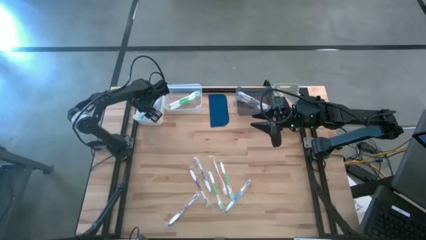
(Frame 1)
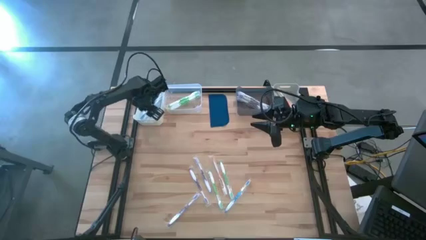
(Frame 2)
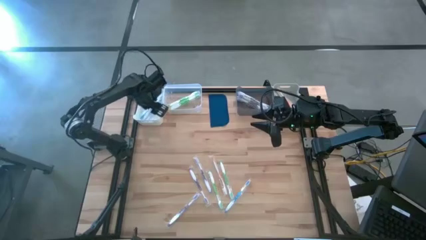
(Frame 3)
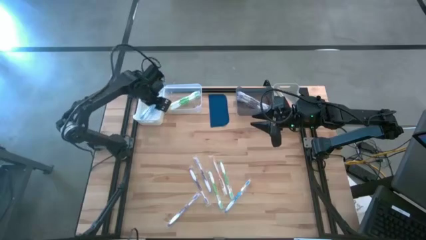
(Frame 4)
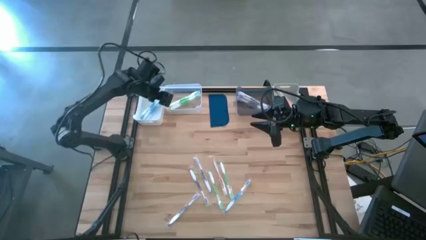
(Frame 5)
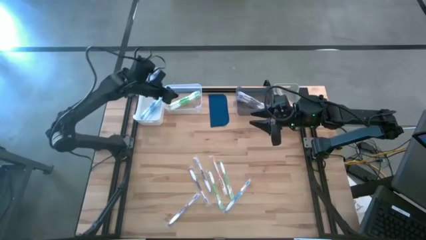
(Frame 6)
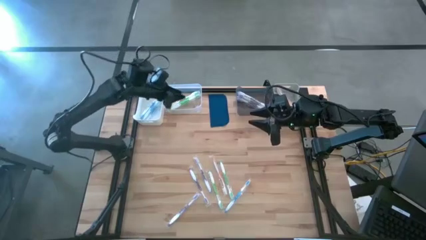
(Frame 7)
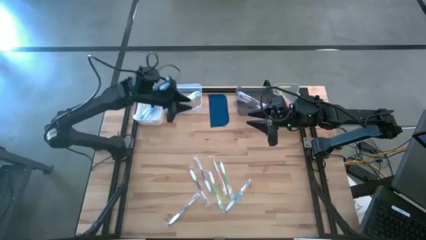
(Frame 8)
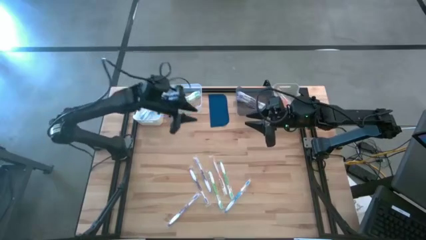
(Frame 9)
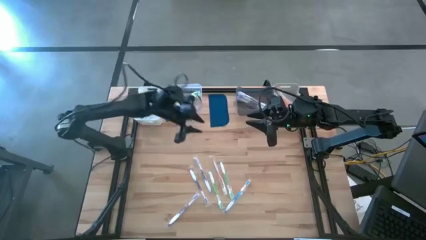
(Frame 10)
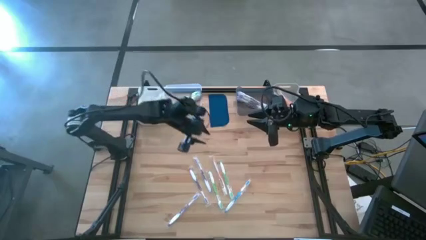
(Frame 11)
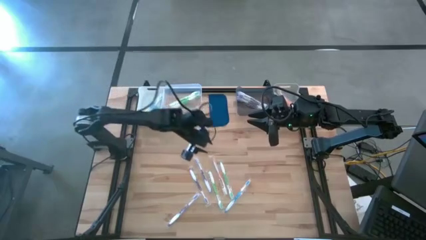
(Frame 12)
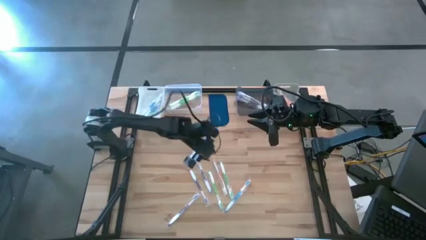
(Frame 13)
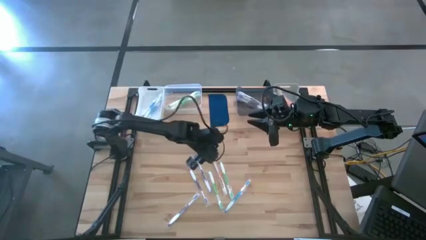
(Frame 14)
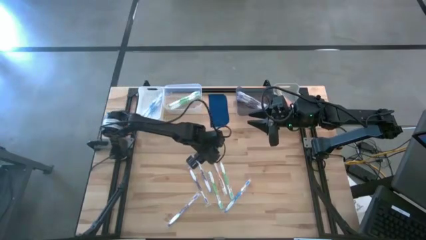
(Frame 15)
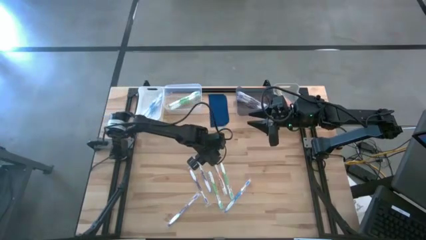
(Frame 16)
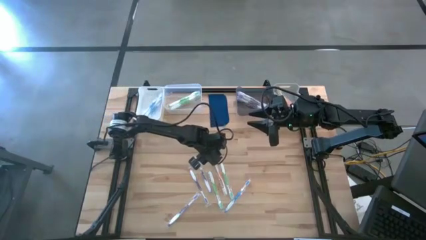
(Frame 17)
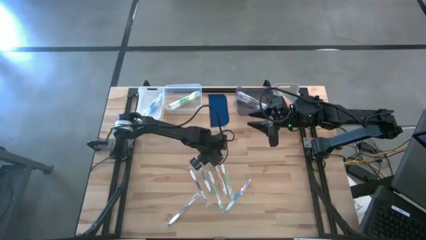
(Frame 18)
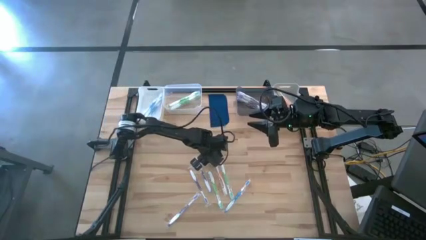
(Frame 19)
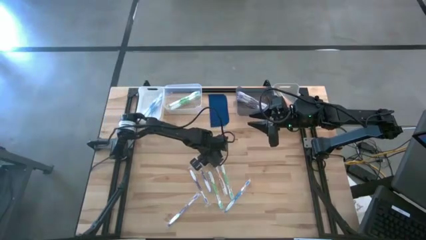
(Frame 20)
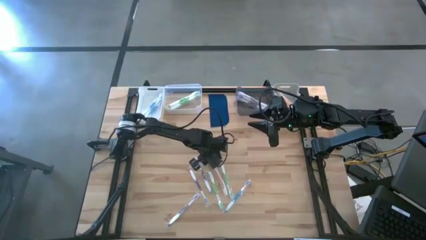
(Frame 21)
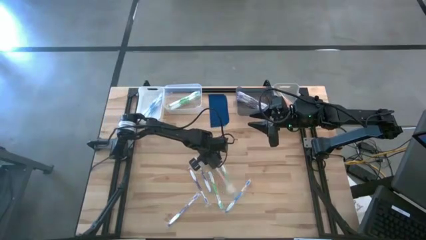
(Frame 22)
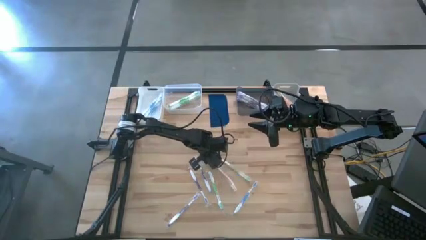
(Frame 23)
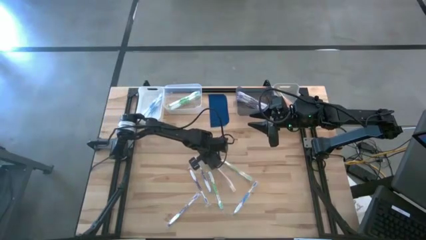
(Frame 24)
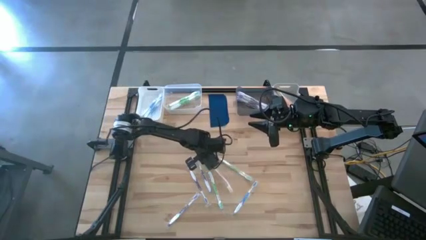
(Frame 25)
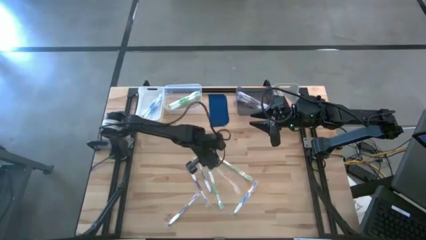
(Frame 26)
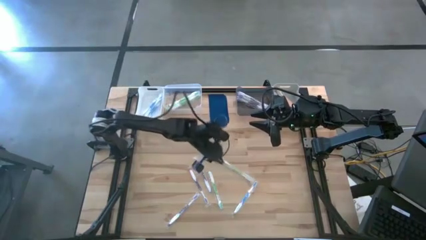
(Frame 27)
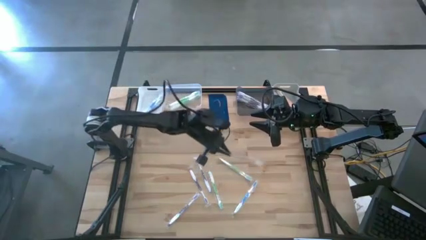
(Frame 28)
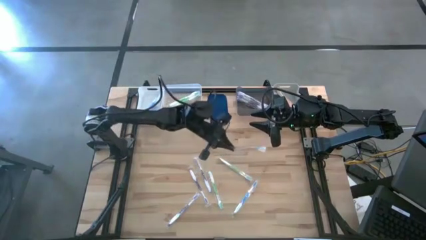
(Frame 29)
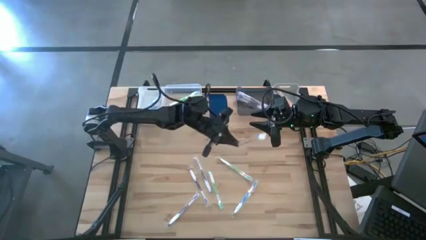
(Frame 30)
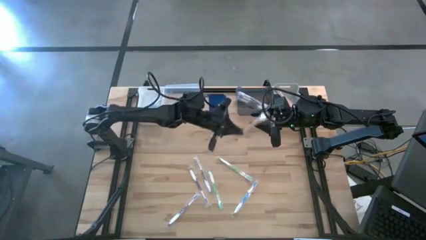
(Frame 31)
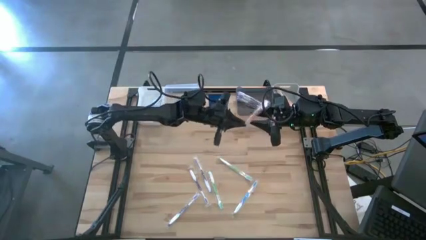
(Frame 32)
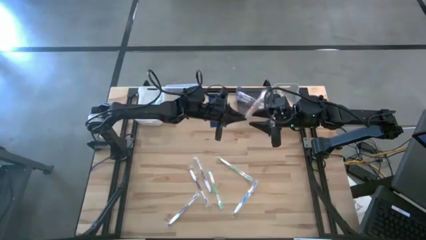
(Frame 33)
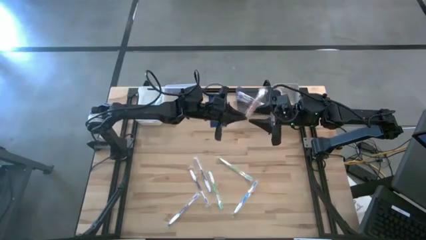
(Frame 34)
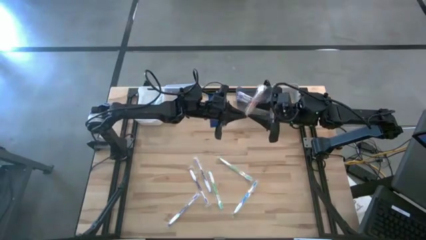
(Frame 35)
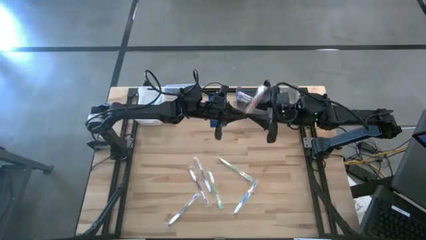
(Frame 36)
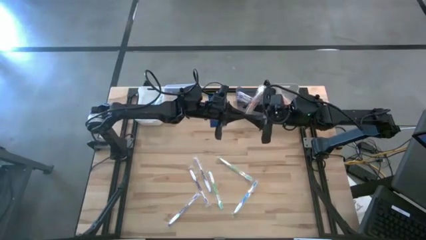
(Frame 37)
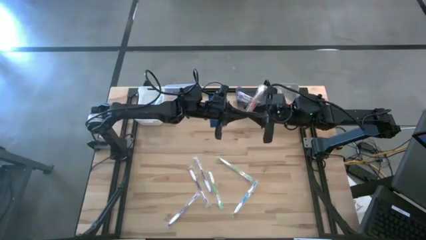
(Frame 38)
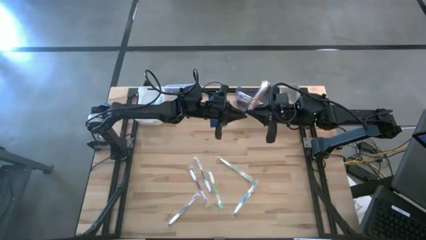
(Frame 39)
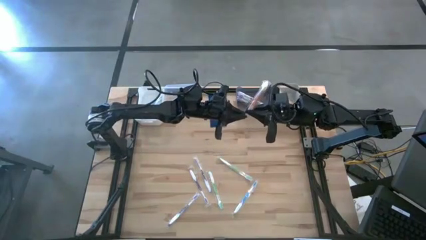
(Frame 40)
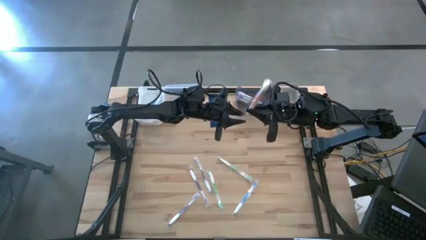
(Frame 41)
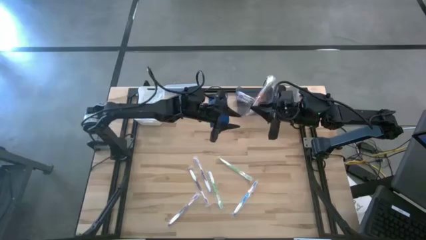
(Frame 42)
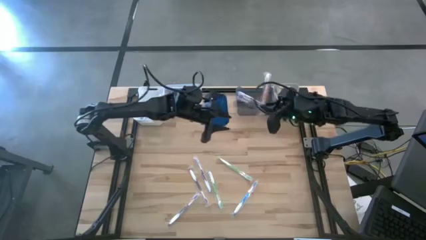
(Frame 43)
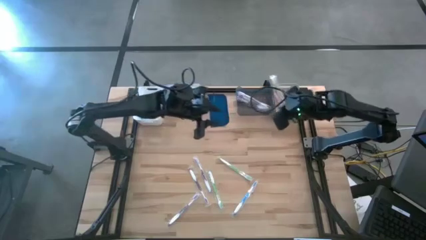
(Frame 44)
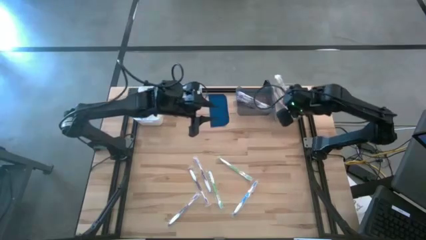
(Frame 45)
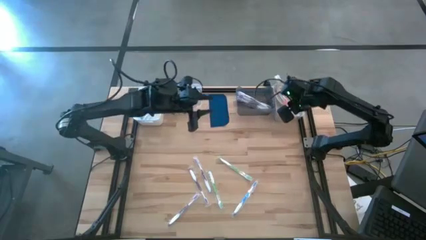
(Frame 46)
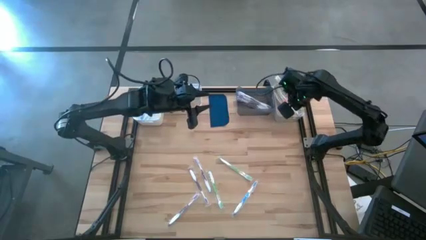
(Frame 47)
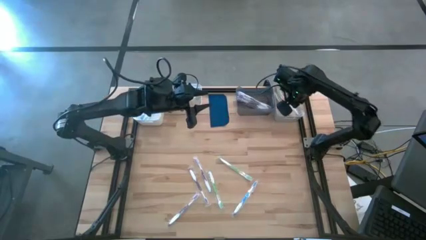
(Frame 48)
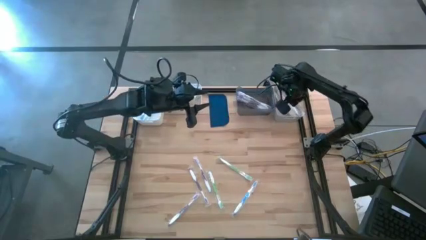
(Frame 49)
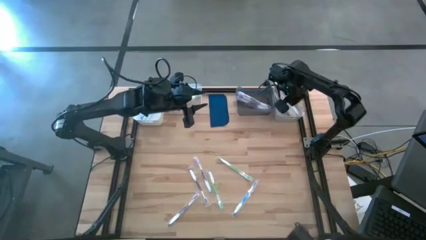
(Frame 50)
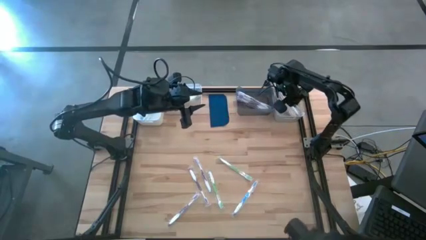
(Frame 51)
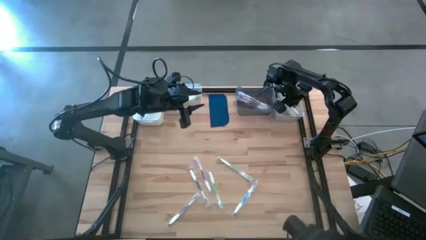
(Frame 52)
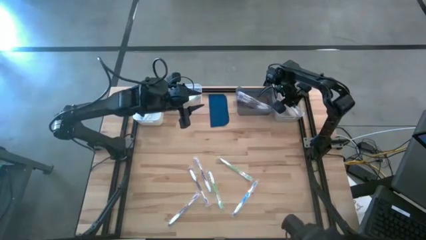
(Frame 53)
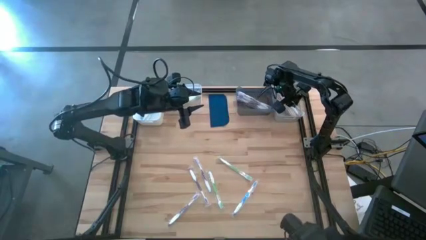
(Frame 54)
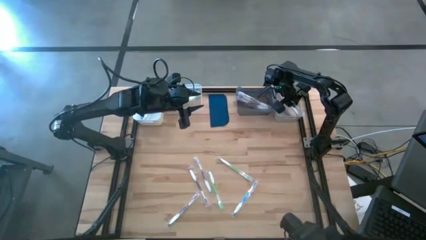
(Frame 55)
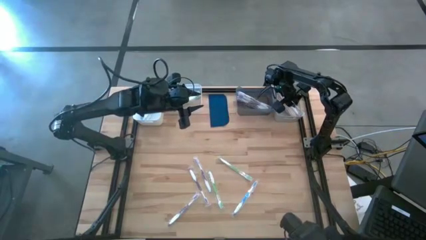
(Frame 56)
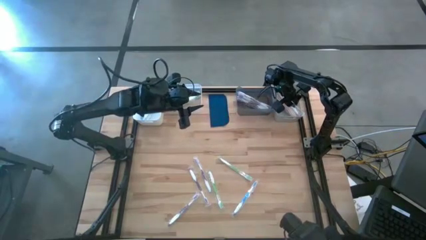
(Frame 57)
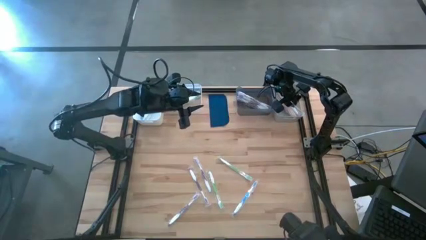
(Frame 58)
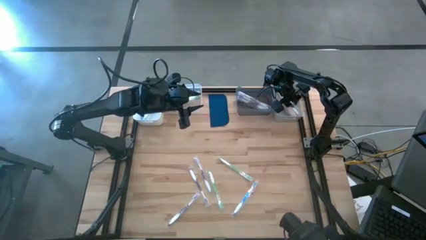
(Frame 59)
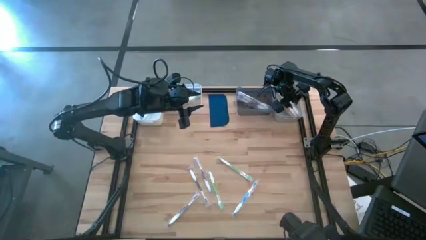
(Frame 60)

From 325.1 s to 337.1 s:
Task: Pick & Place Toothbrushes
Put the orange toothbrush into the gray bin

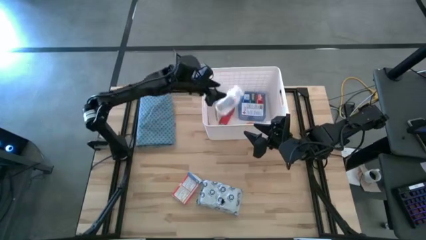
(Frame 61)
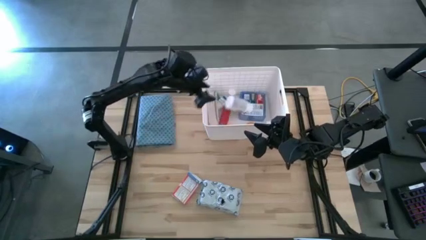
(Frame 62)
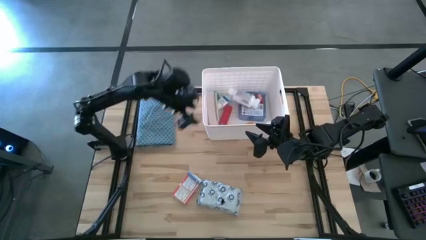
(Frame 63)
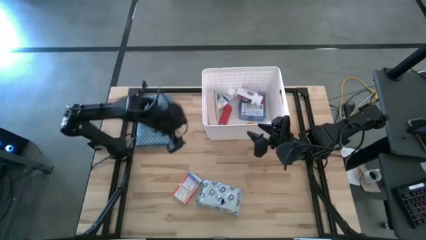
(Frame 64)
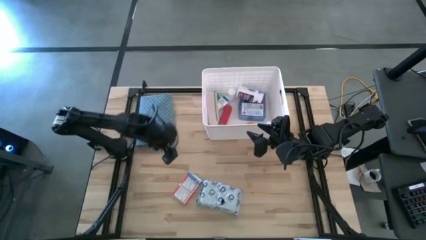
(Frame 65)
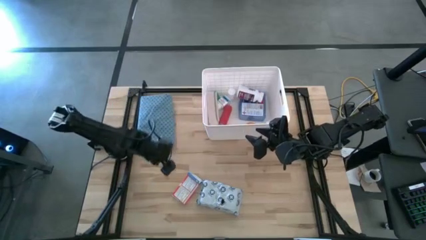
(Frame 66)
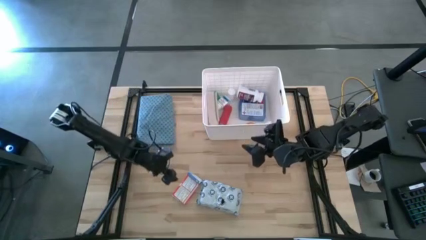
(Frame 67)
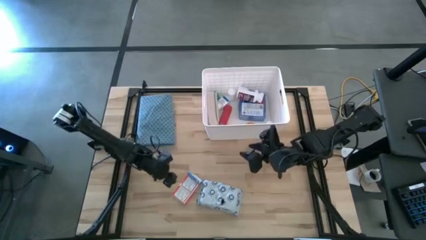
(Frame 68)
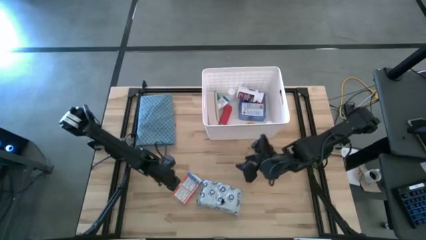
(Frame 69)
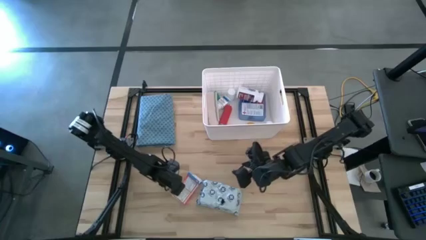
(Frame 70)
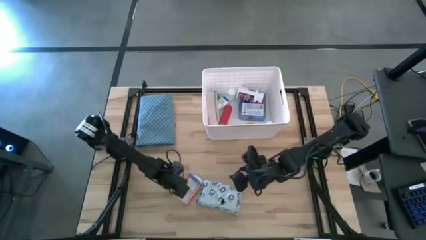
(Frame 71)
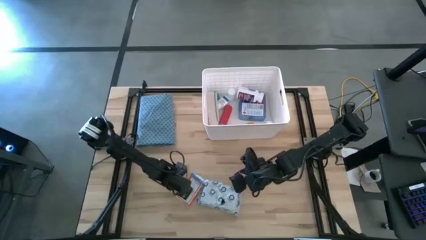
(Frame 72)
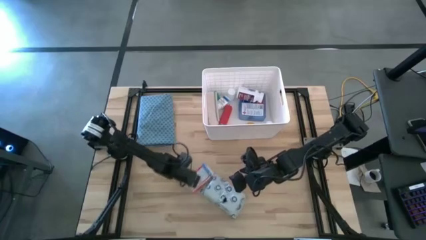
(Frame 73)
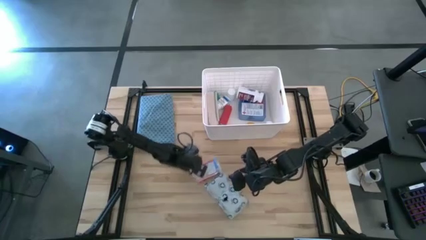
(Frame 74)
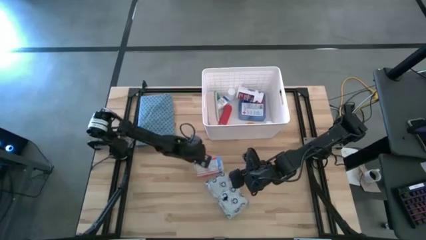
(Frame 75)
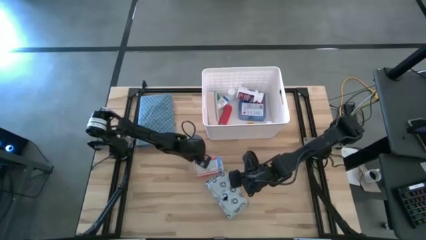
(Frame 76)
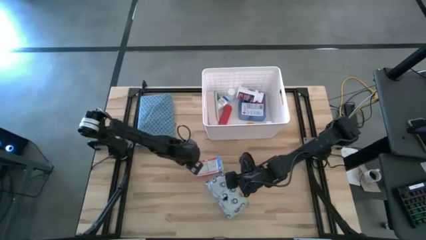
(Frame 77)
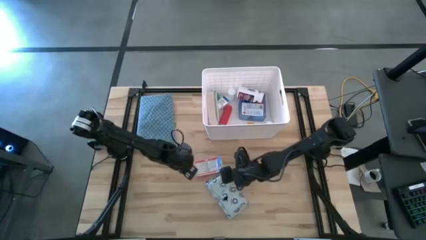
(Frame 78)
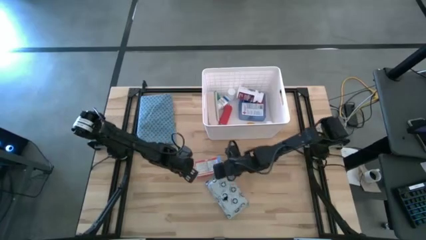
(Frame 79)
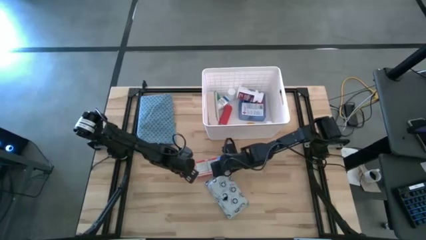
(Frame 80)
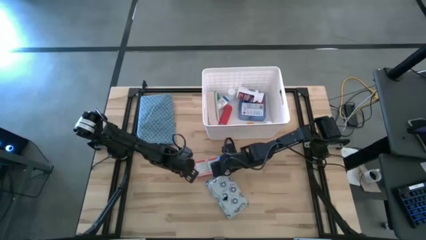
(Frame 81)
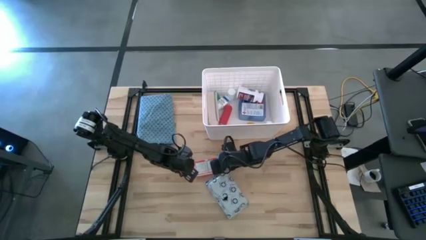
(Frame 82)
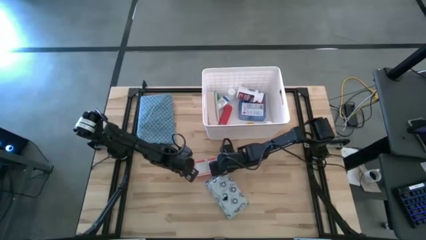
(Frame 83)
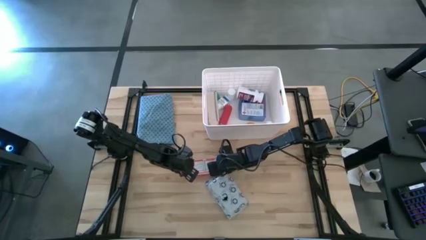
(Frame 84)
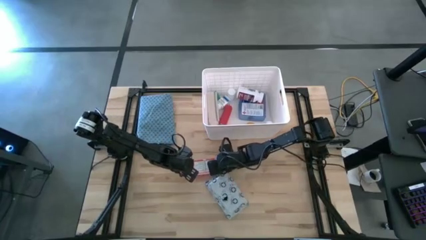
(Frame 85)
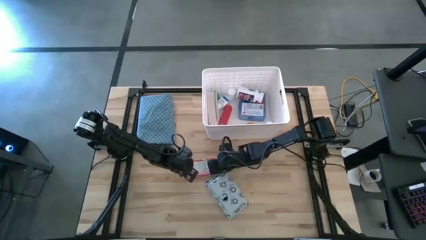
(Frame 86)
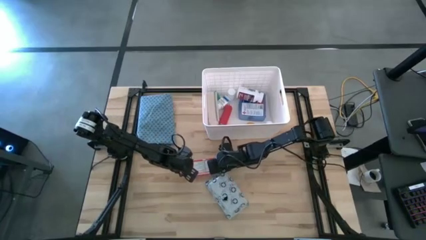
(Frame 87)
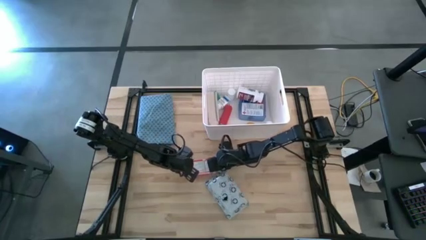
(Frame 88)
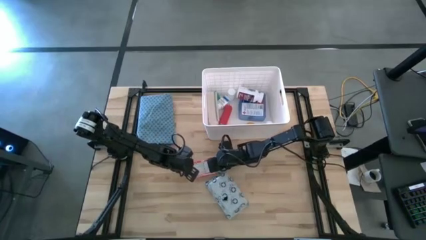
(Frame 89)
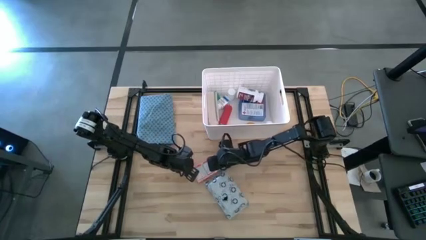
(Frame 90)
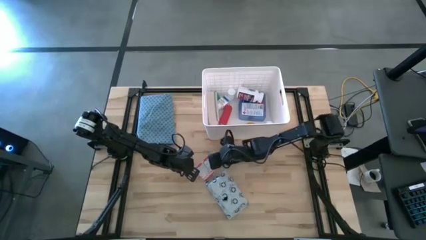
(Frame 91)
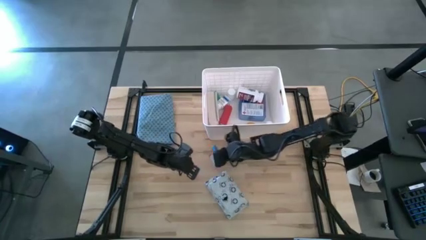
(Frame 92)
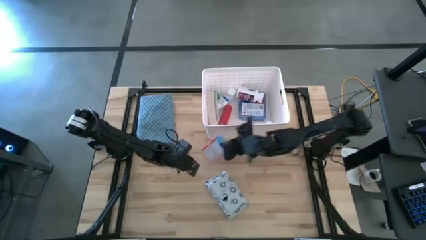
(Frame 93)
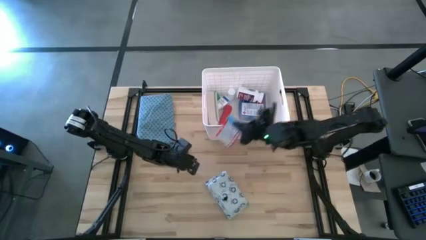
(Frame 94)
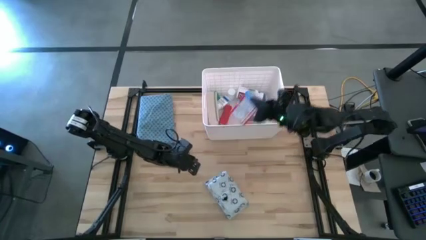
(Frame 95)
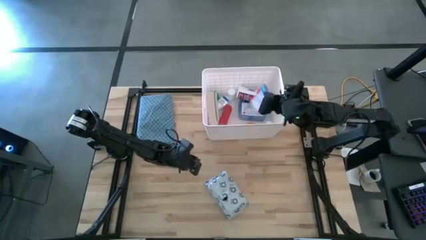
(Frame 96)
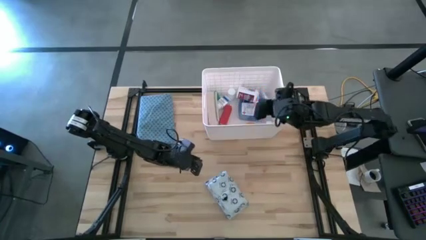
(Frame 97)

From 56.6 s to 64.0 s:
Task: Pick & place medical supplies in basket/bin
Put the medicine box into the white bin
